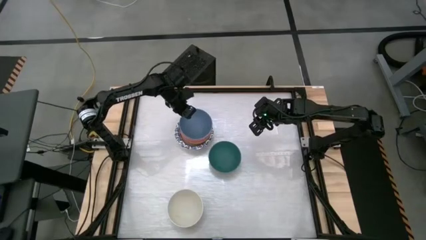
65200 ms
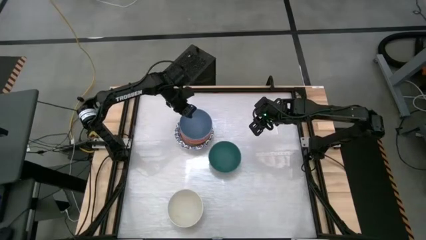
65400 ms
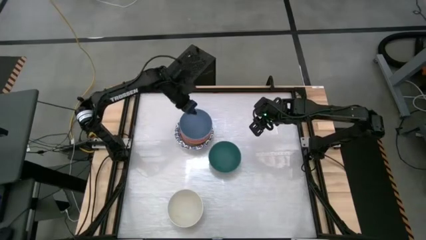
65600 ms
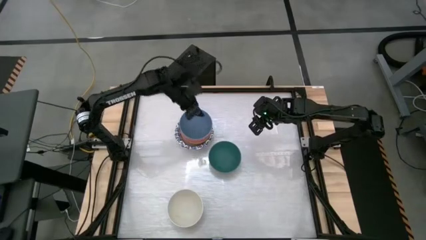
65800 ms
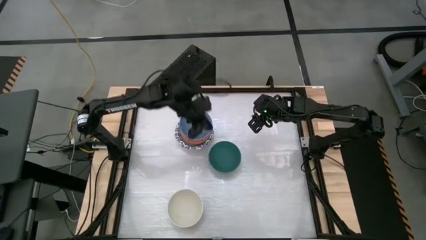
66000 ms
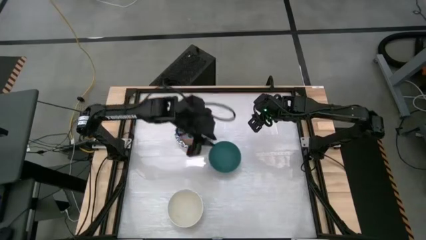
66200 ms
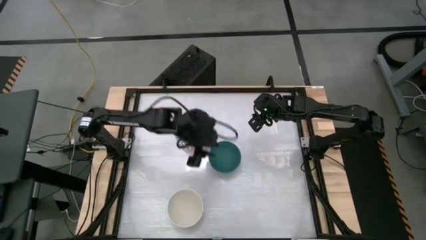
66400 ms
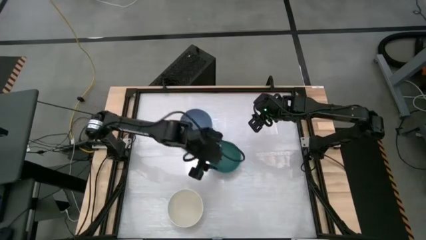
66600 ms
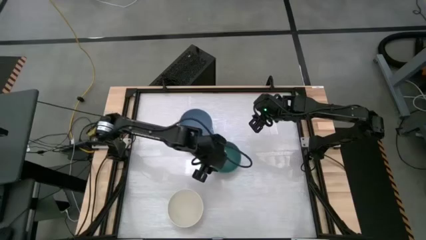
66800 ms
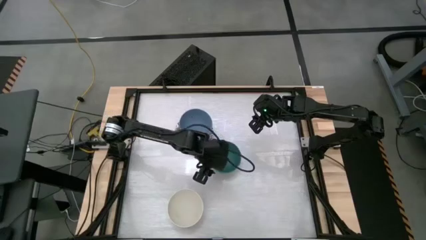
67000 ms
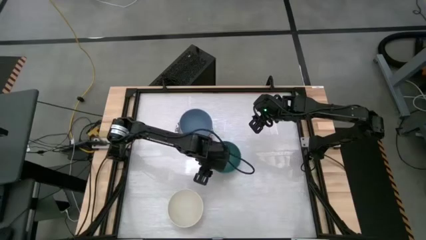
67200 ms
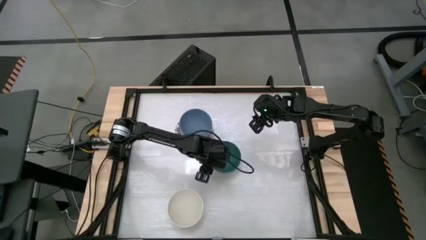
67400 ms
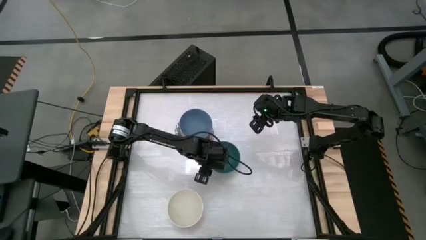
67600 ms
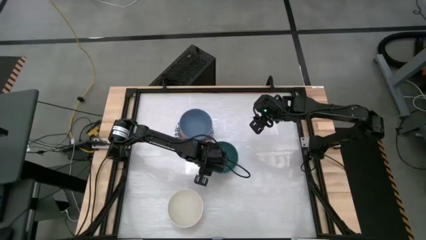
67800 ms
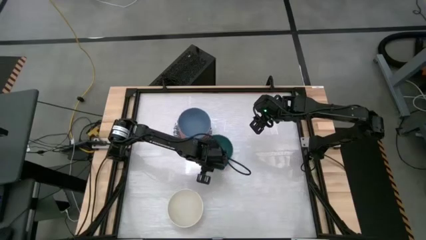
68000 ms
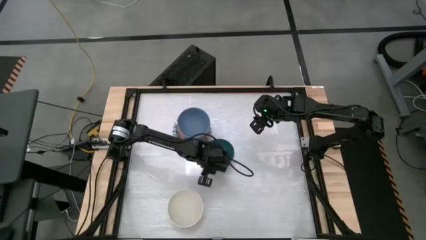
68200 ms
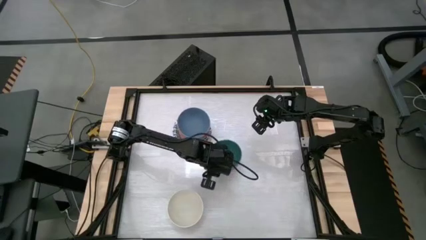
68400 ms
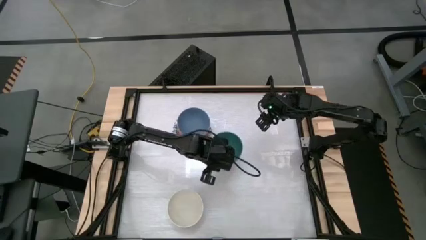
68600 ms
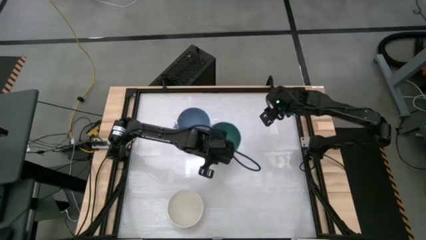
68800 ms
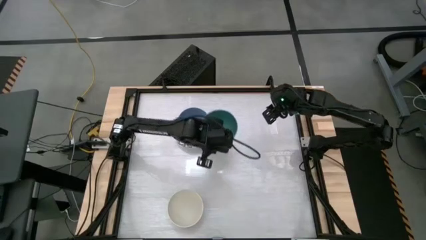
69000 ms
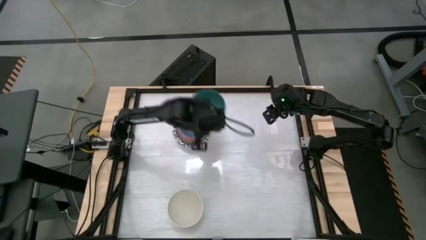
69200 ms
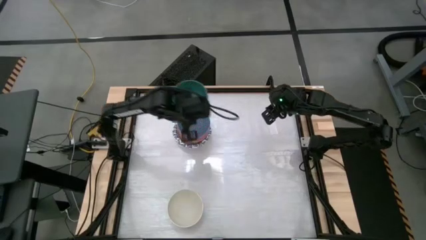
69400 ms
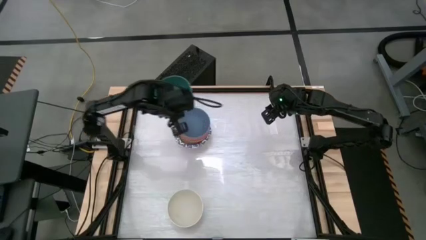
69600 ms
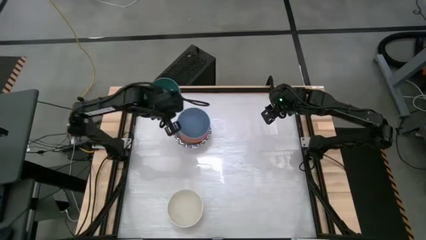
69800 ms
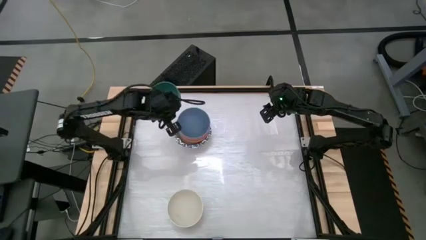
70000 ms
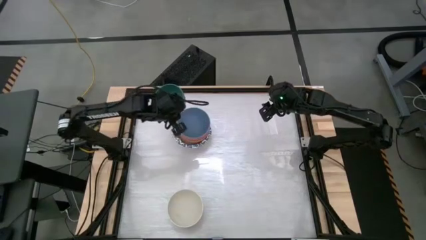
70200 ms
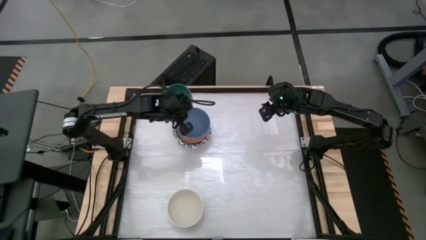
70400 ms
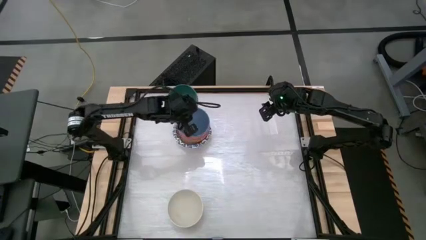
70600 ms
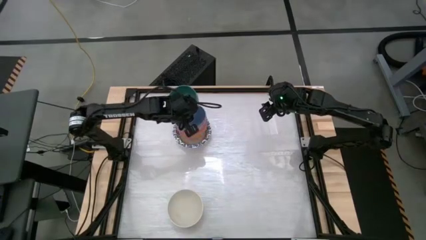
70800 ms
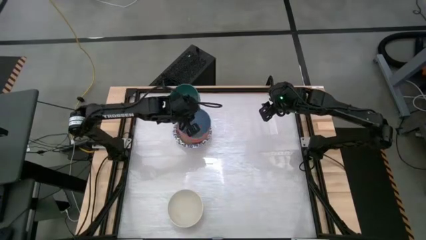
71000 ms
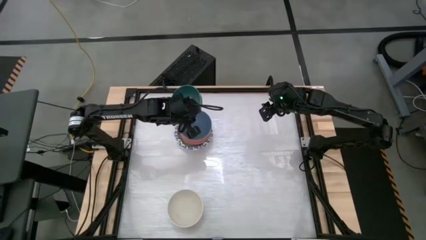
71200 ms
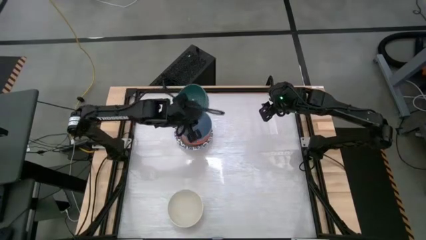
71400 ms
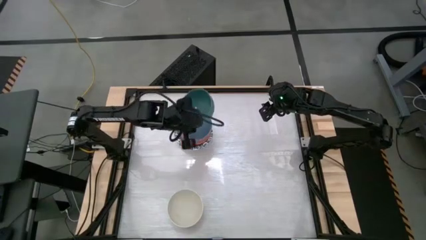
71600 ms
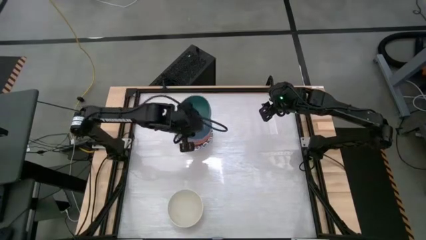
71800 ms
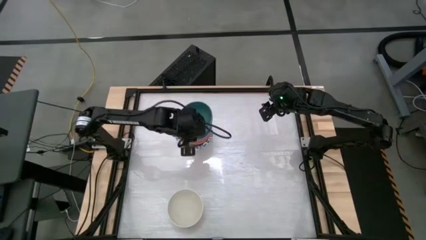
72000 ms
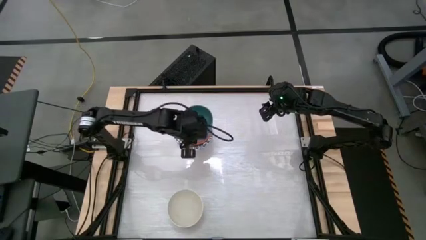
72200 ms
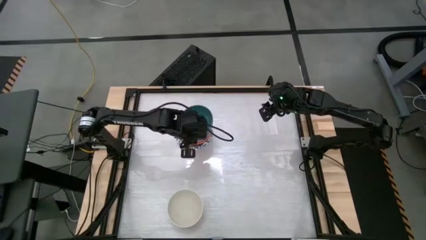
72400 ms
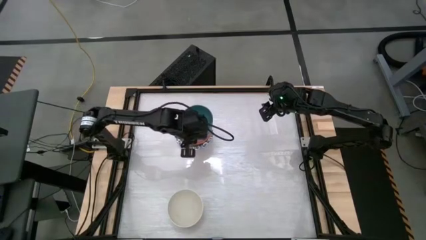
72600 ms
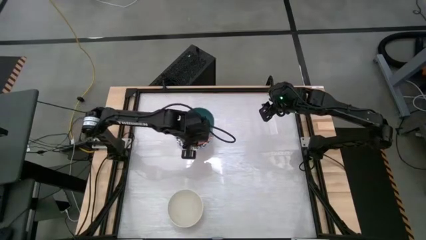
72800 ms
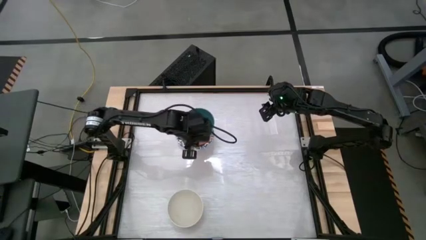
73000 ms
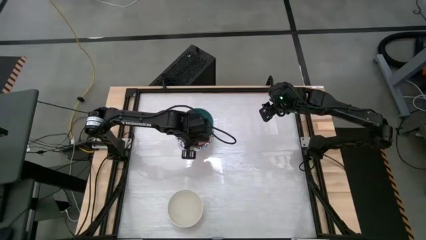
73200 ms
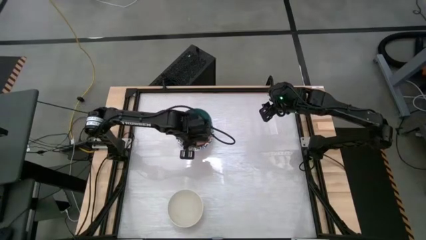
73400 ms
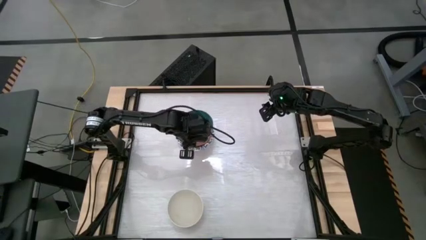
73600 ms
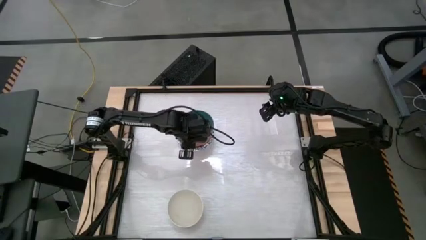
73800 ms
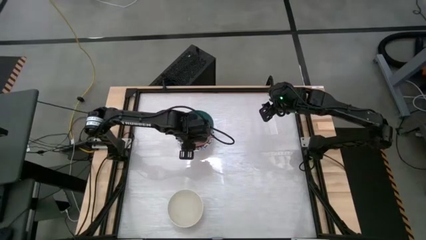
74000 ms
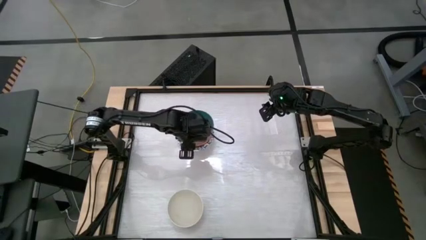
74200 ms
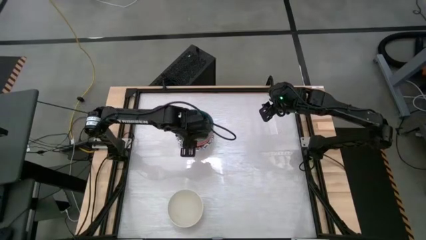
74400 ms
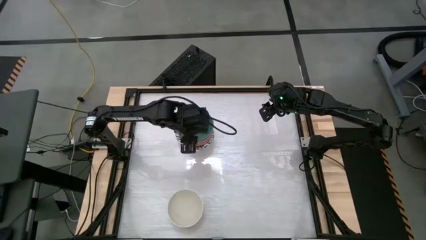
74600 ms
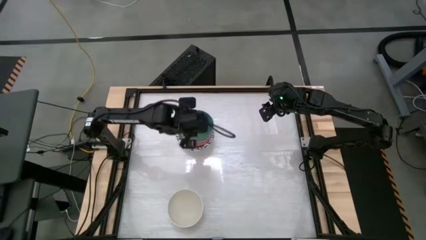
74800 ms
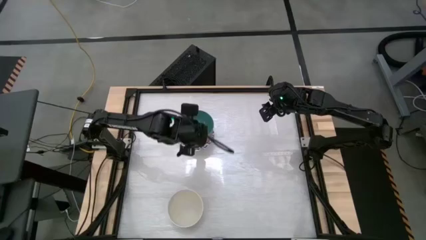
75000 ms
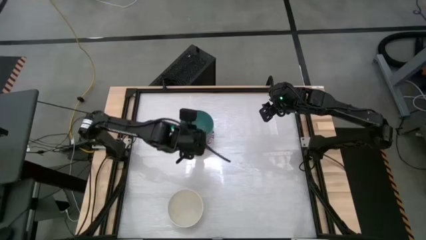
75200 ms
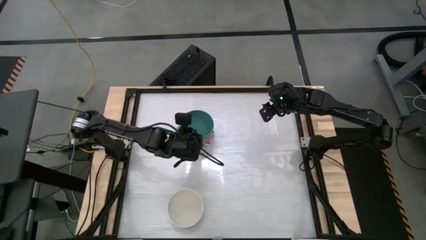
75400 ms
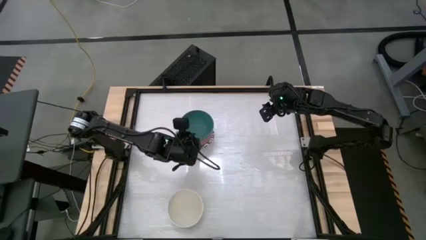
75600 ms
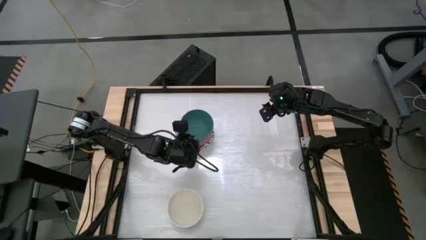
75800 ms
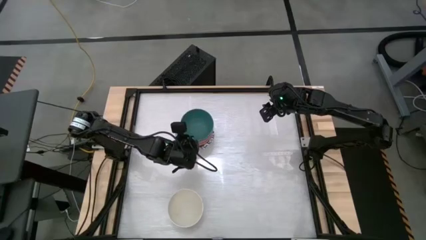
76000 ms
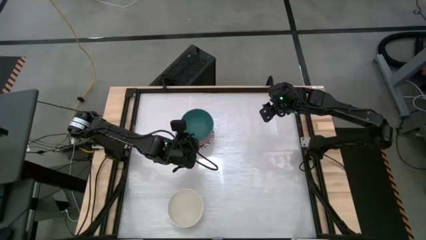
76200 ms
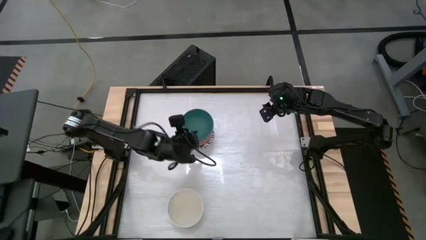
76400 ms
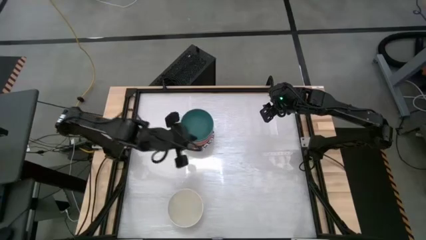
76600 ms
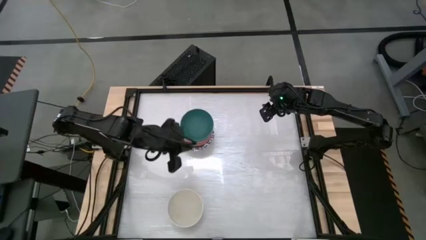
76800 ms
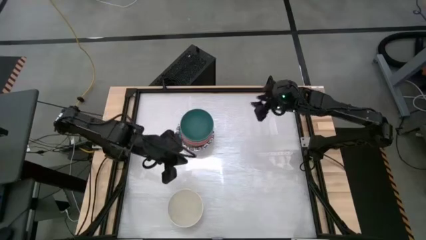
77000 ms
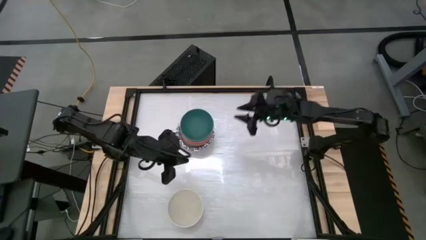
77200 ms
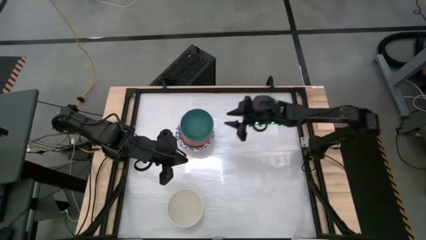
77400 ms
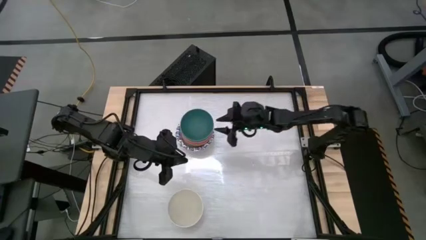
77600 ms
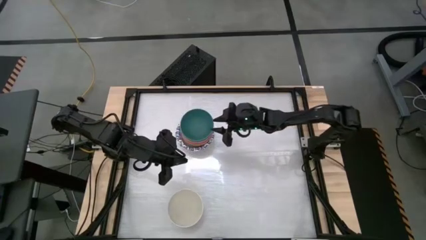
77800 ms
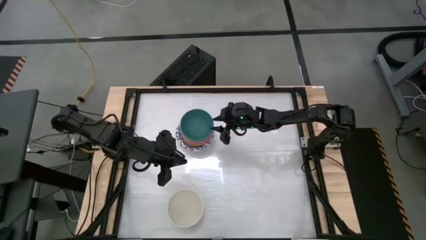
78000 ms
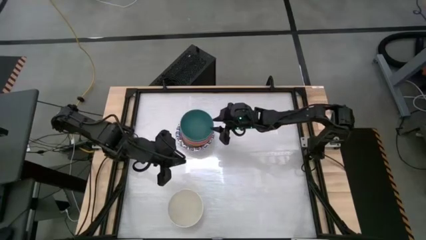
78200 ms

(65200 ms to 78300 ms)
Stack the green bowl on top of the blue bowl
